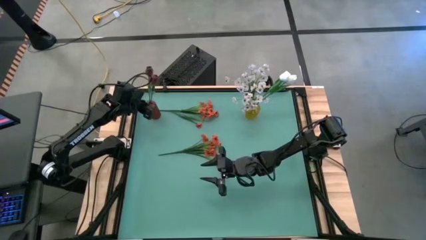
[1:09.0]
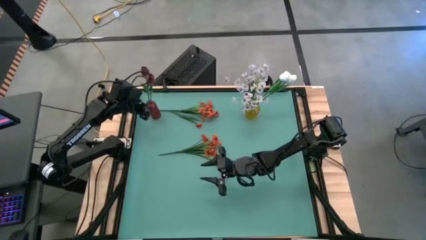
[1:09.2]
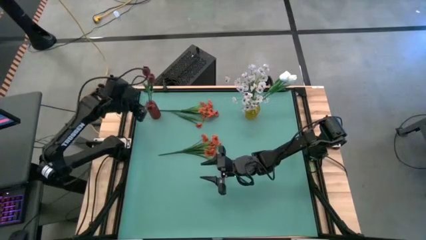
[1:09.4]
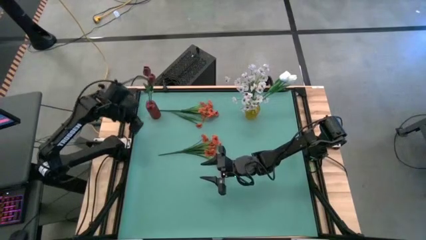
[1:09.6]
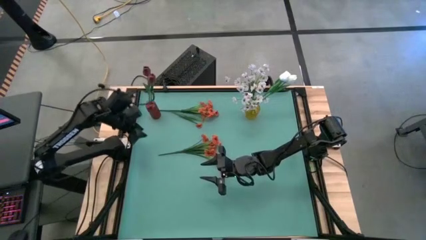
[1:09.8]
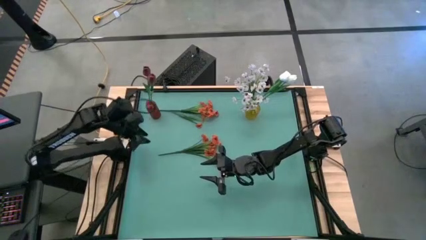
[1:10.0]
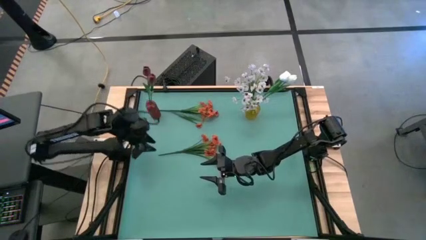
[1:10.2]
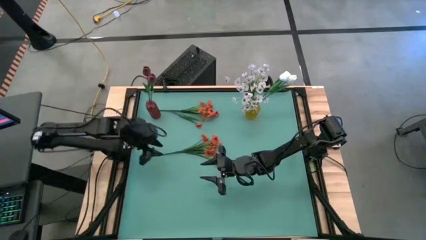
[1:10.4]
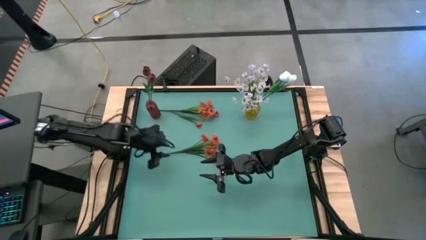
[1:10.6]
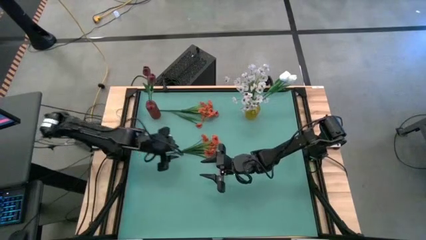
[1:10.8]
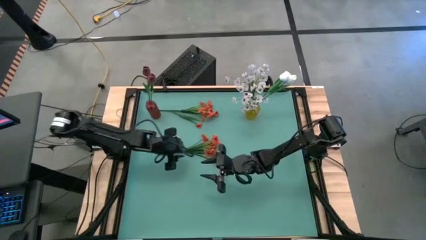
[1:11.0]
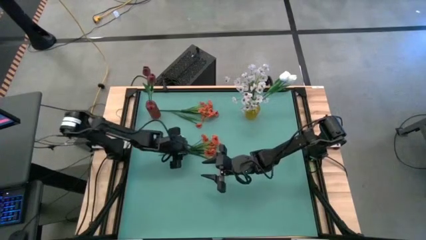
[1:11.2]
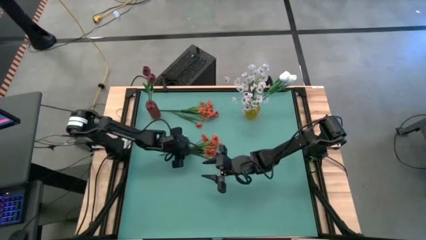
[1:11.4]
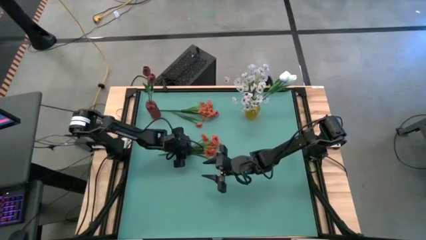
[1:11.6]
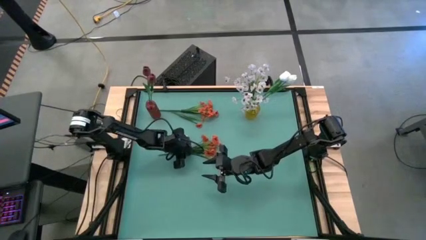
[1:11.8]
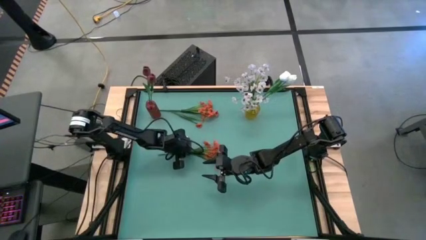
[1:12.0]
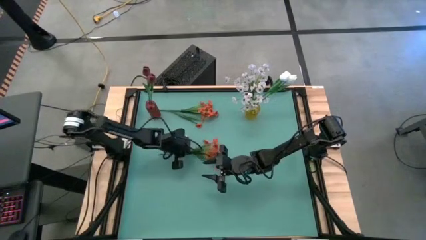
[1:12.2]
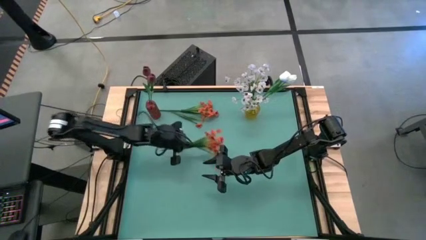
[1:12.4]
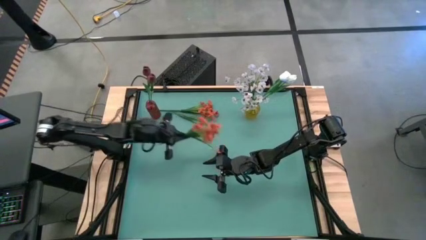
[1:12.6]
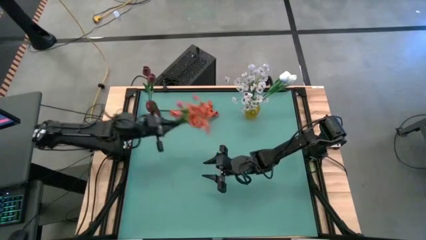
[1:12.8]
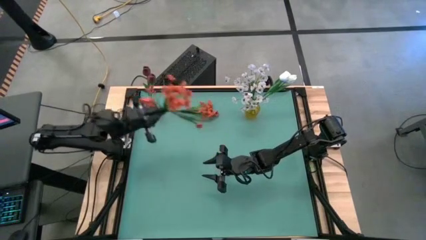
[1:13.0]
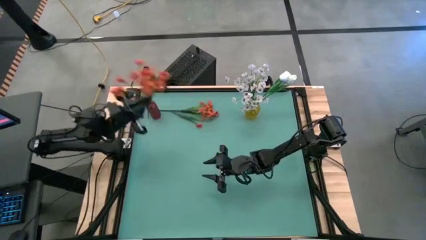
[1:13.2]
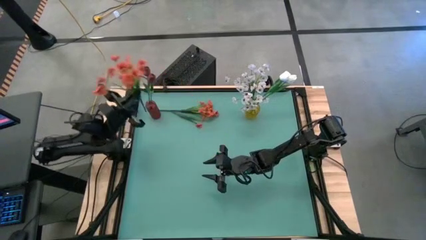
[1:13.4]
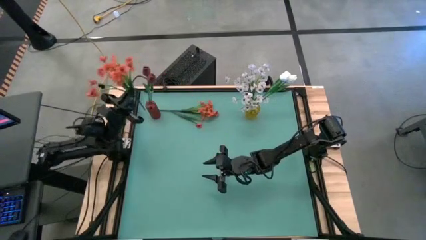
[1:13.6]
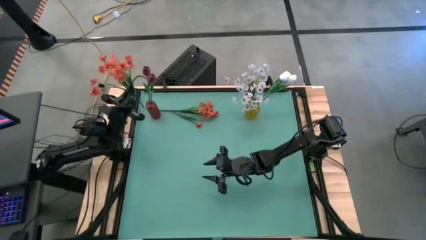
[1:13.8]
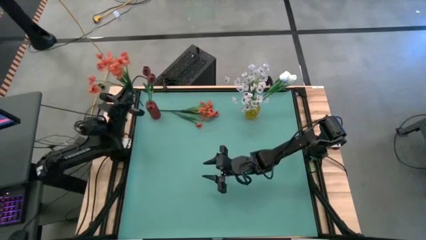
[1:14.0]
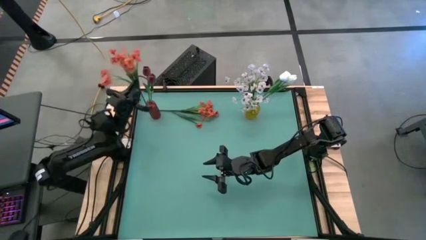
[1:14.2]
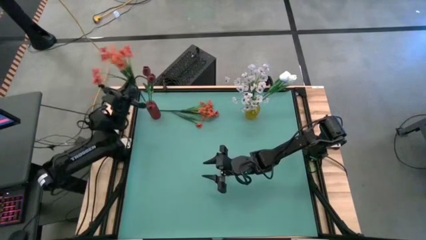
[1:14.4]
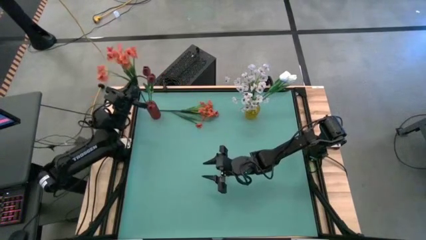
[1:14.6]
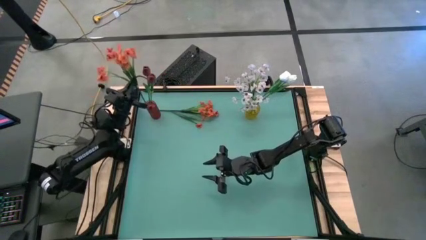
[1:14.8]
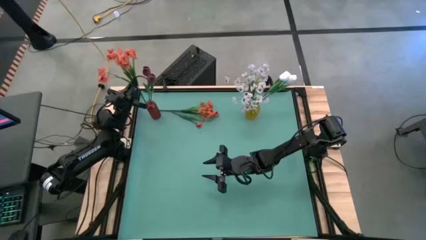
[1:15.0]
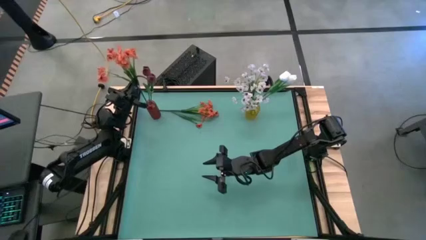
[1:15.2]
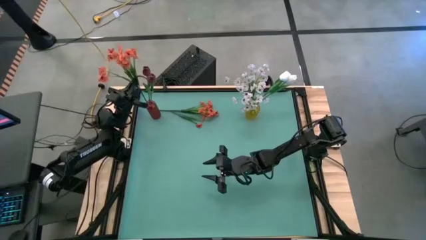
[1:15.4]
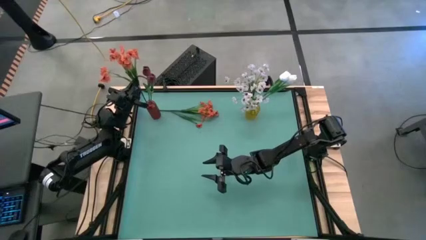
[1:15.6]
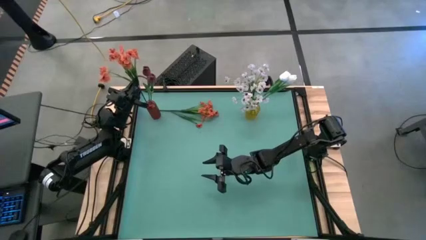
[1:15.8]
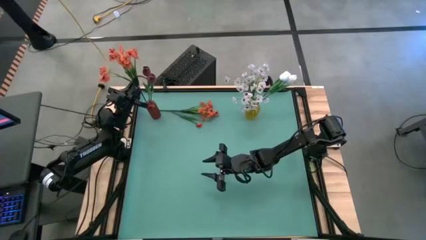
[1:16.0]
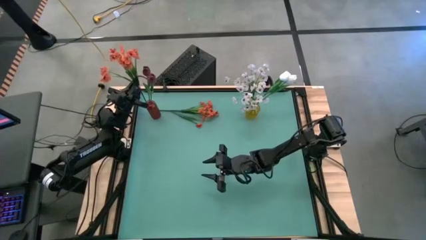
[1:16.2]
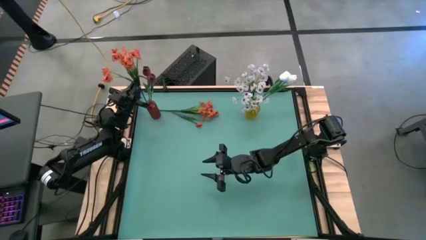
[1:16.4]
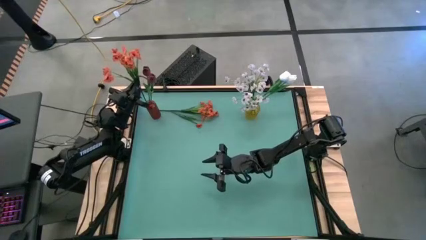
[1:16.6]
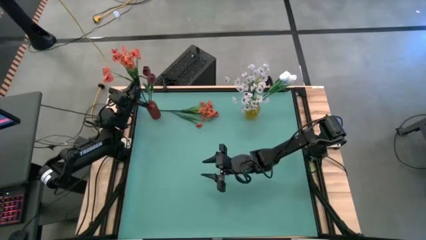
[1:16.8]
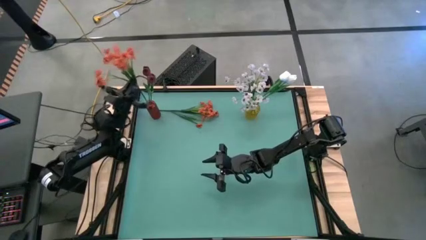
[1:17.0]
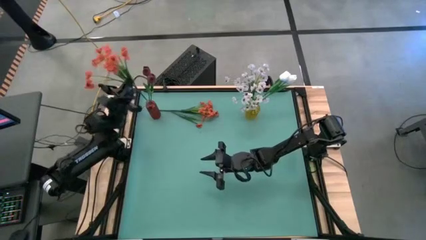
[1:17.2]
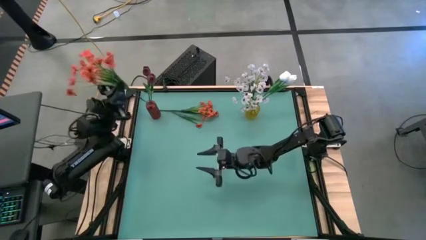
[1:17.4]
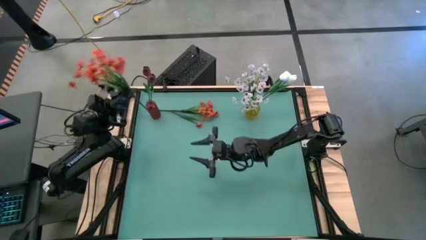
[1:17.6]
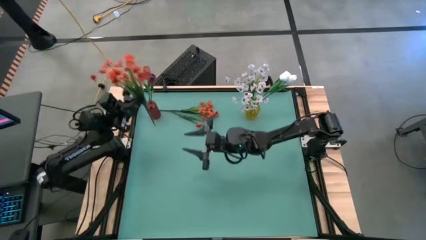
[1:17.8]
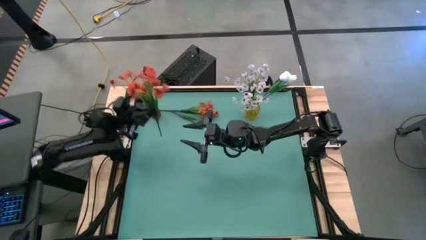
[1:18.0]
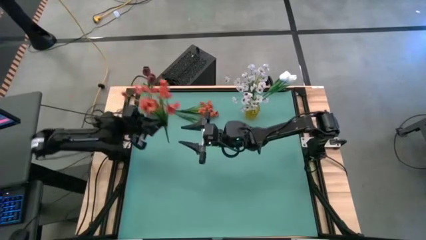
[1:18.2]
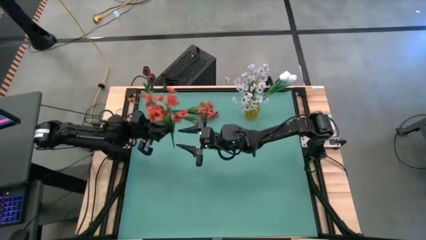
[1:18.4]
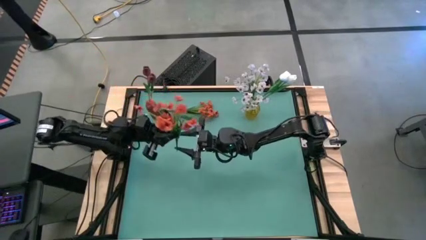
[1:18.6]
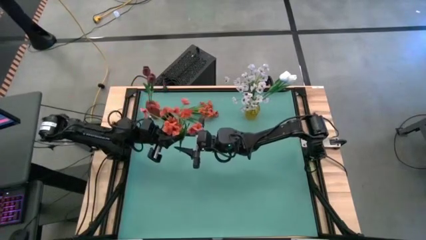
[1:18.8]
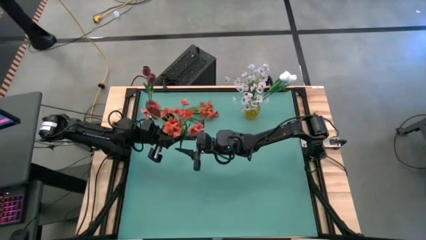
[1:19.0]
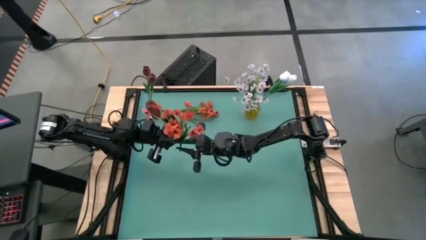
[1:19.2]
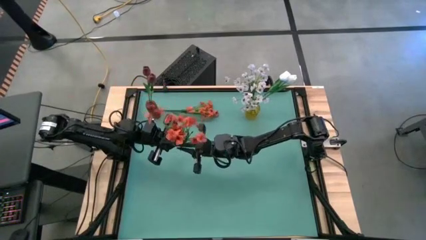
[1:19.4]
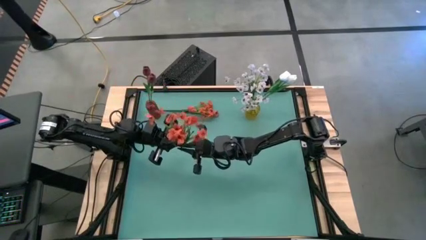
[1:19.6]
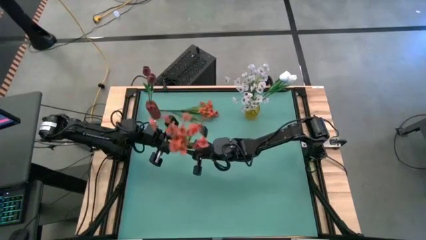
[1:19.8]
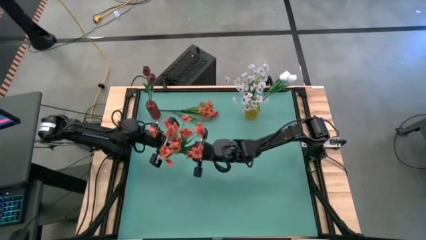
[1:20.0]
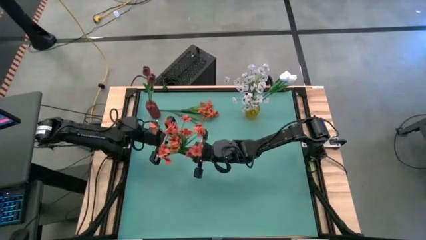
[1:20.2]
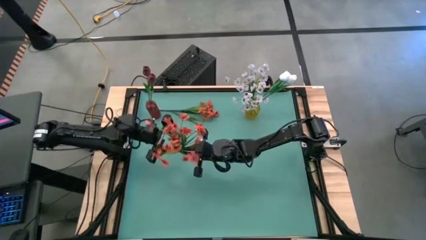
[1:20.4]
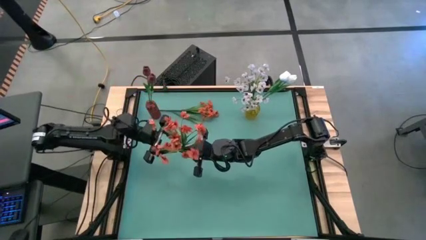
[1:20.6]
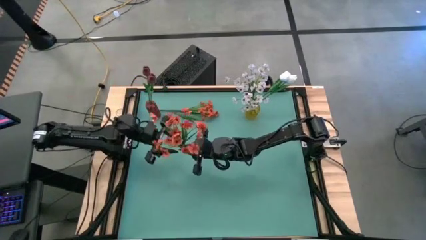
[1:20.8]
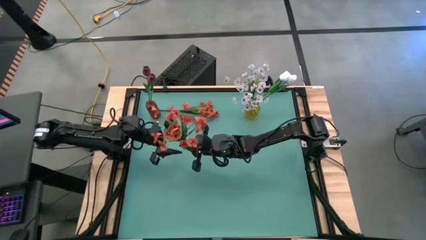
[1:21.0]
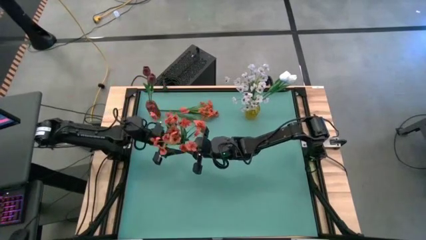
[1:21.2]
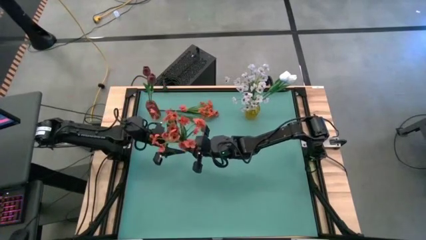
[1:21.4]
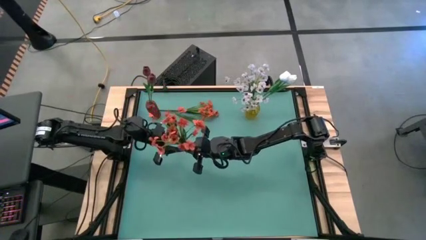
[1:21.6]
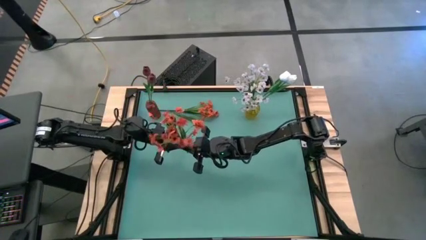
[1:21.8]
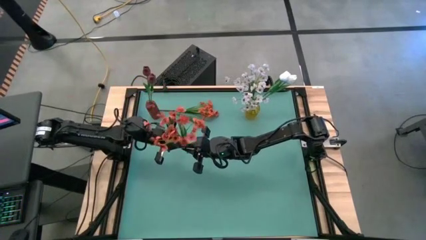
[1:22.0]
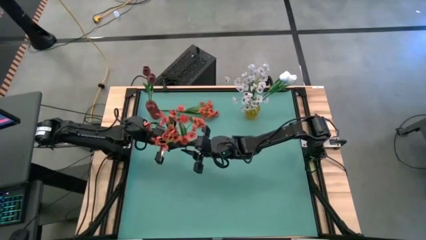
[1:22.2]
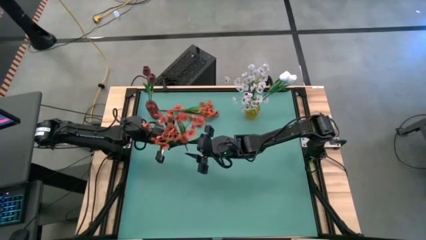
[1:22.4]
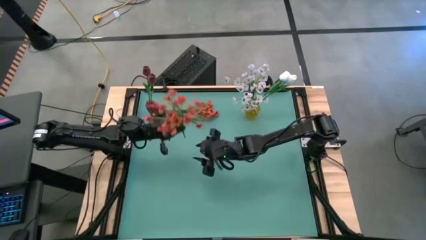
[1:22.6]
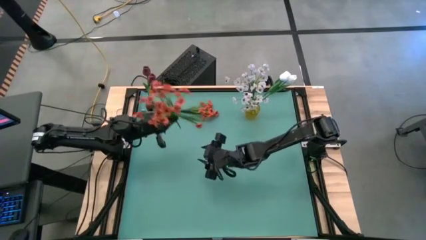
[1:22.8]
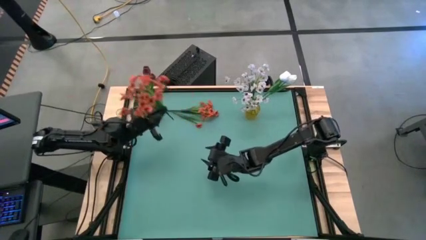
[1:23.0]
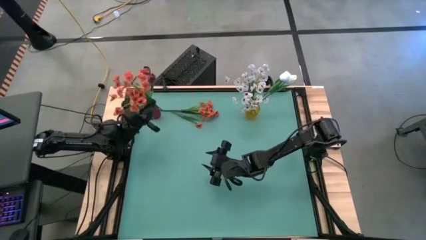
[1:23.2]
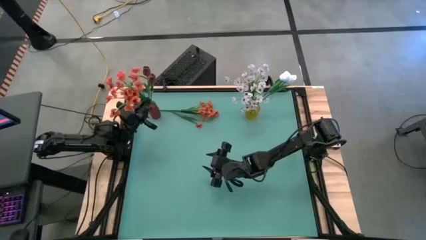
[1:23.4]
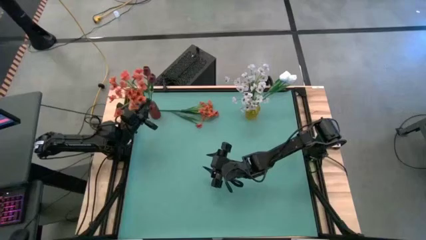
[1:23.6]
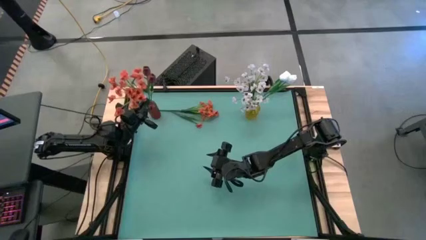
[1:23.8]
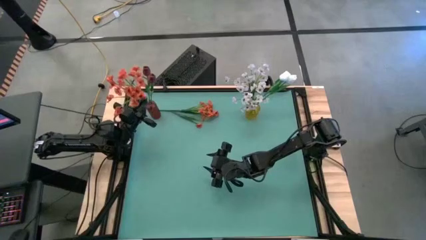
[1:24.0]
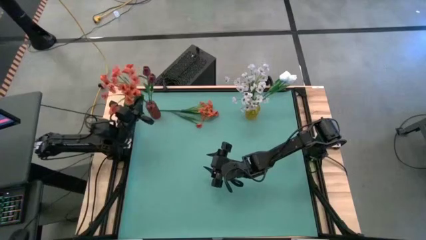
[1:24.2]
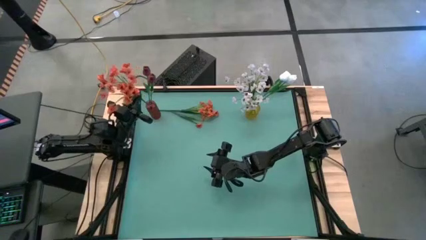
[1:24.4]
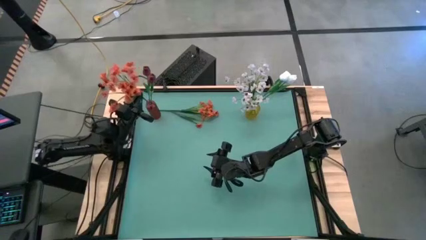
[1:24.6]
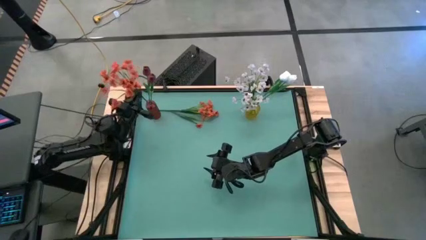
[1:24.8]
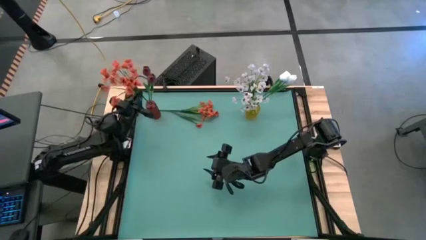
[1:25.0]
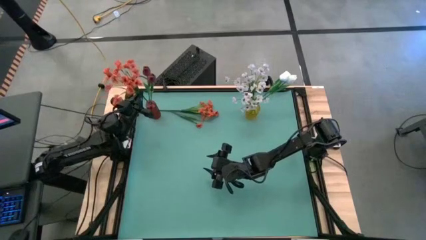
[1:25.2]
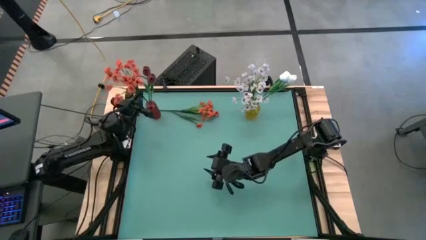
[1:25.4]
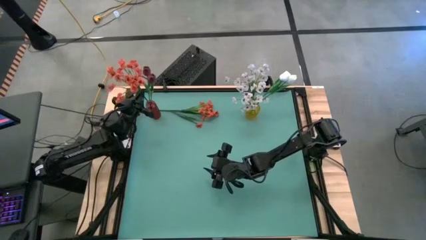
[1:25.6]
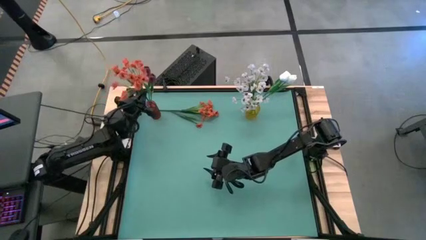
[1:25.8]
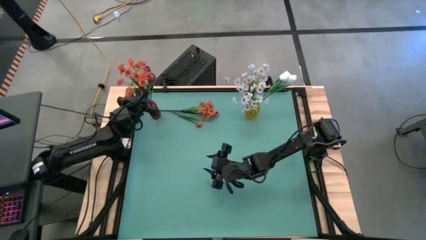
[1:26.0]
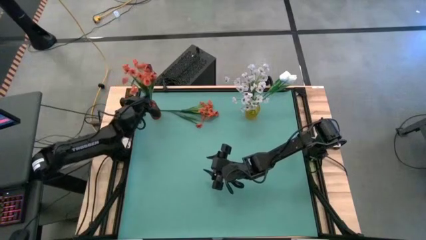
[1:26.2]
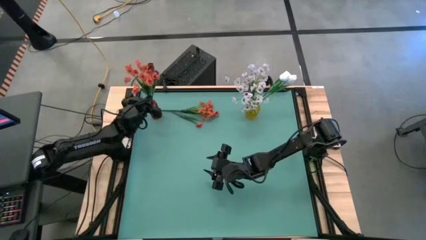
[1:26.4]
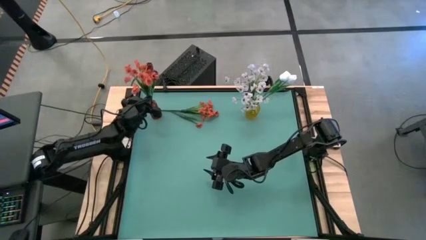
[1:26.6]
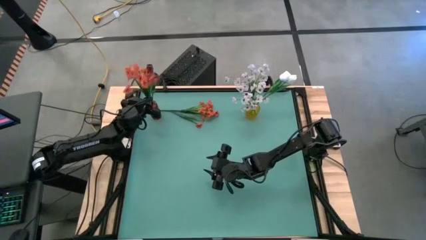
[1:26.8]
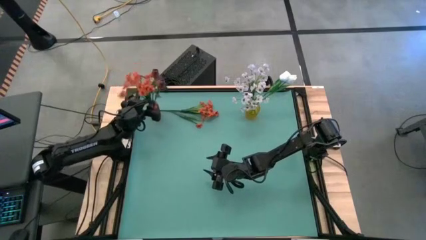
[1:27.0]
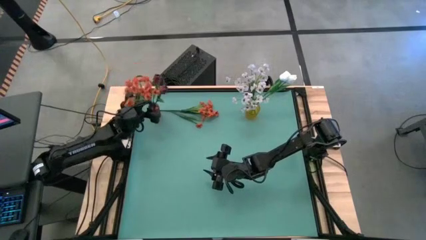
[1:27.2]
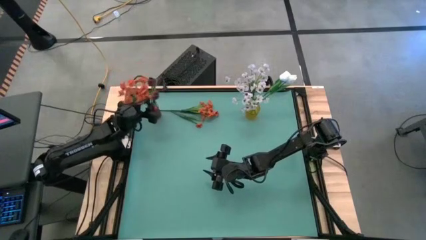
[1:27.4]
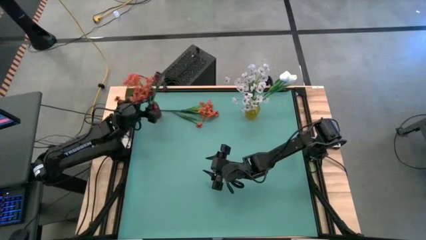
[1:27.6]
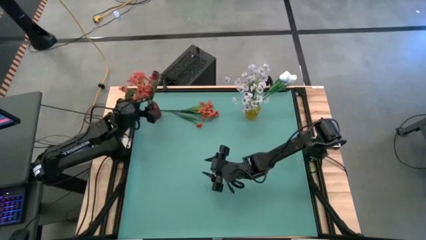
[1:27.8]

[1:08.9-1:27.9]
Task: Sort flowers into vase by color
Put the bottom red flowers into the red vase
